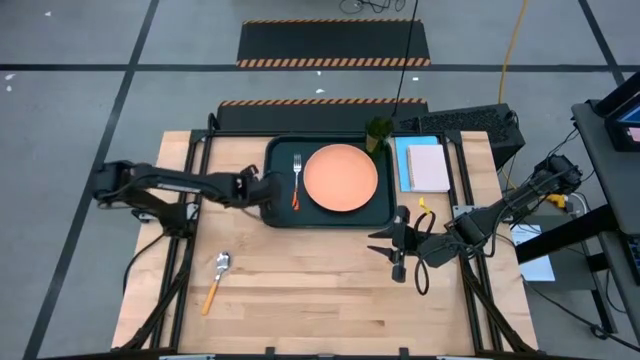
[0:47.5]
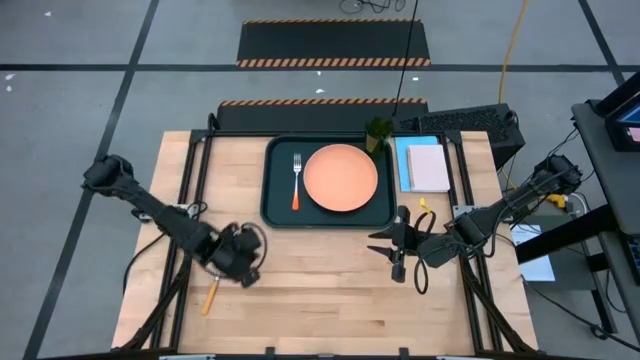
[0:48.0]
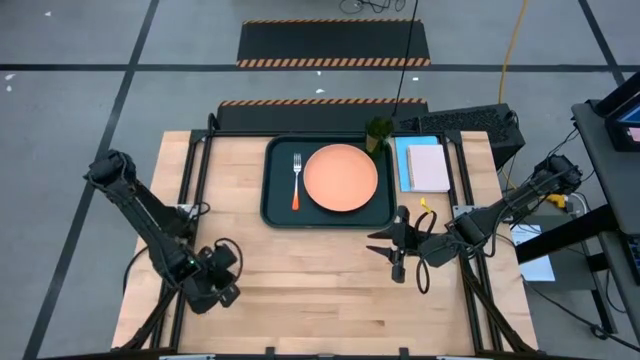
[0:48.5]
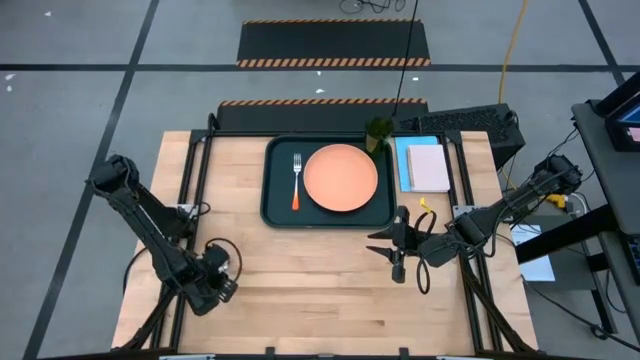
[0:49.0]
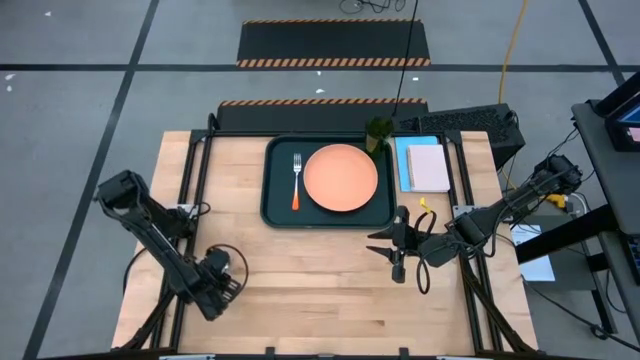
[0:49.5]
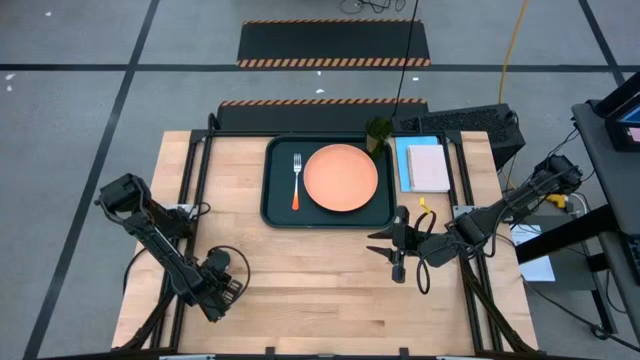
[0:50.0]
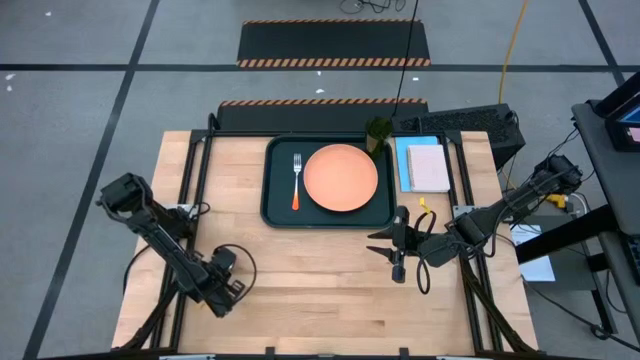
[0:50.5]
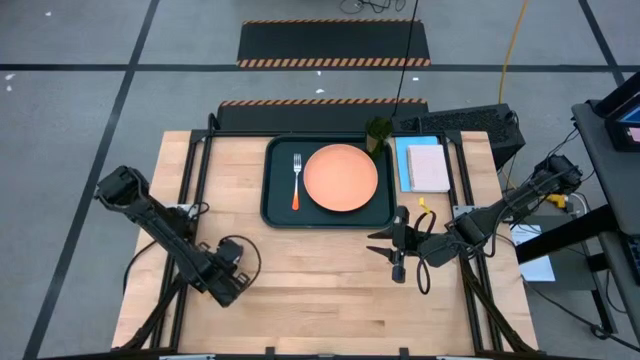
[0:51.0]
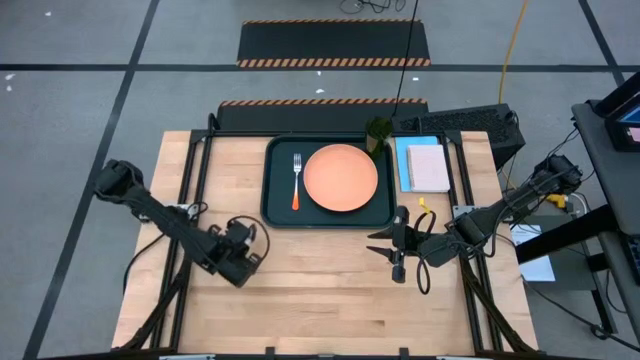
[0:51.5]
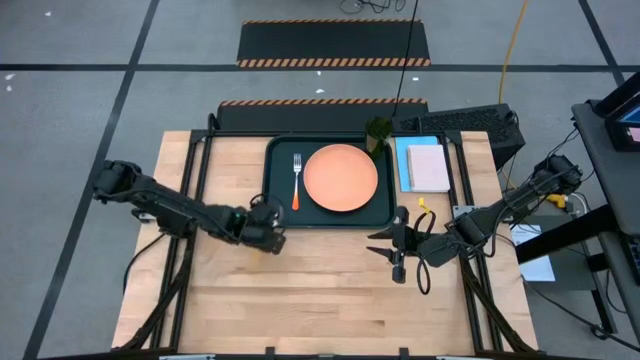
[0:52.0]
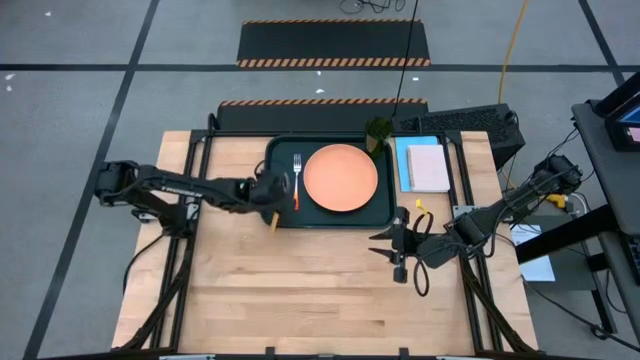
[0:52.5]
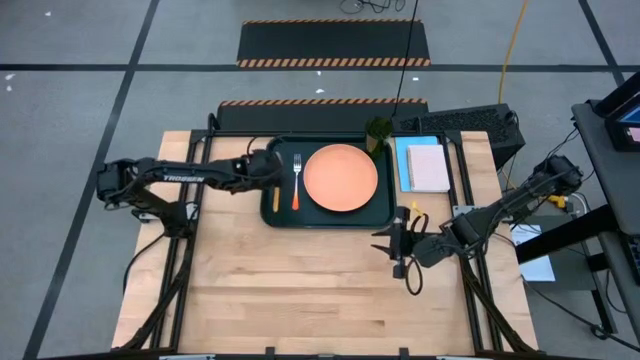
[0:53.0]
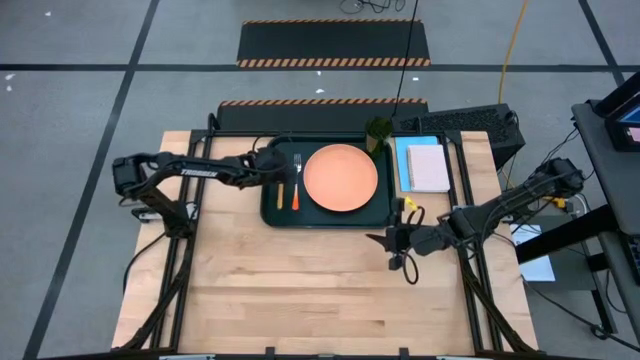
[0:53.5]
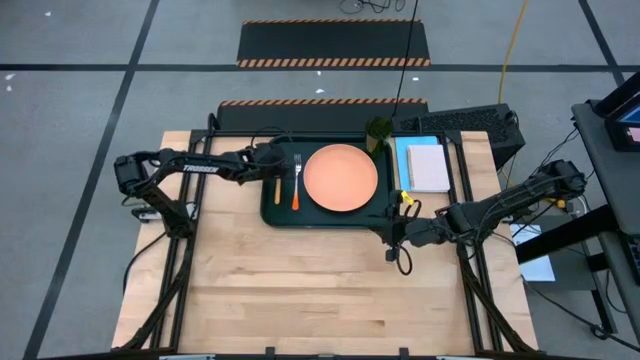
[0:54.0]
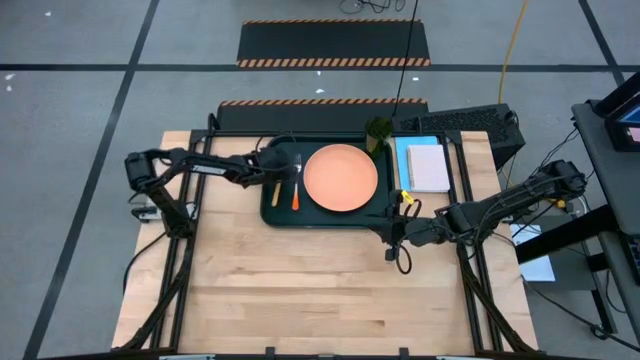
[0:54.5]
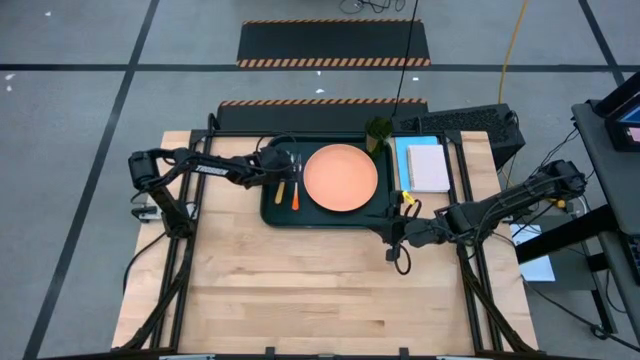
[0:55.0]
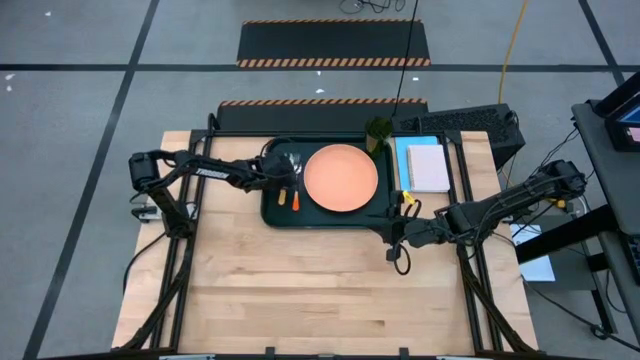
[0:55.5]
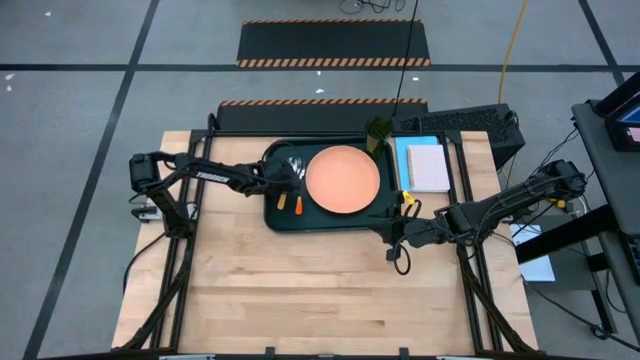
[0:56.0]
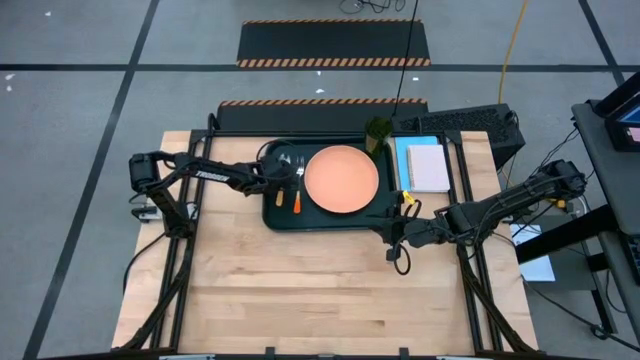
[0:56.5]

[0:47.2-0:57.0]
Task: Pick and place plate/cup/fork/spoon on tray
Put the orange spoon on the black serving tray to the left of the orange fork

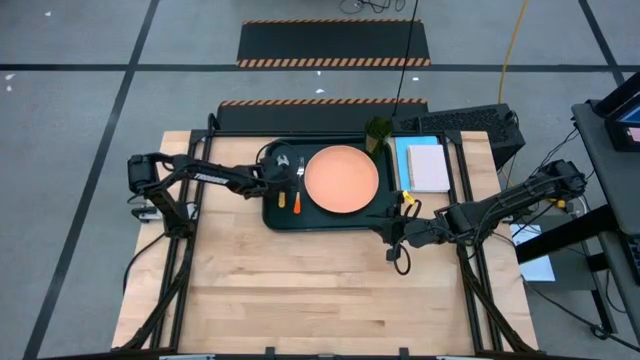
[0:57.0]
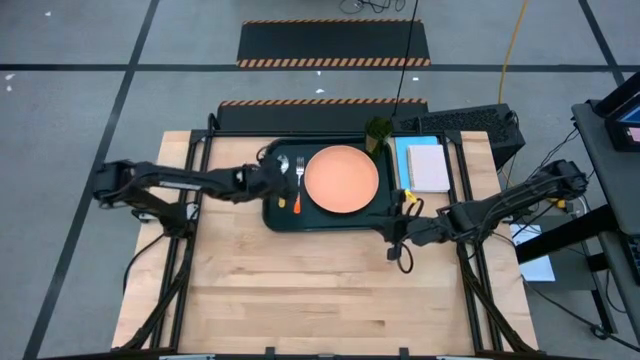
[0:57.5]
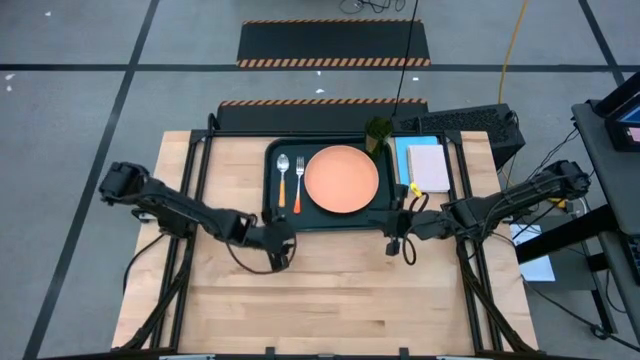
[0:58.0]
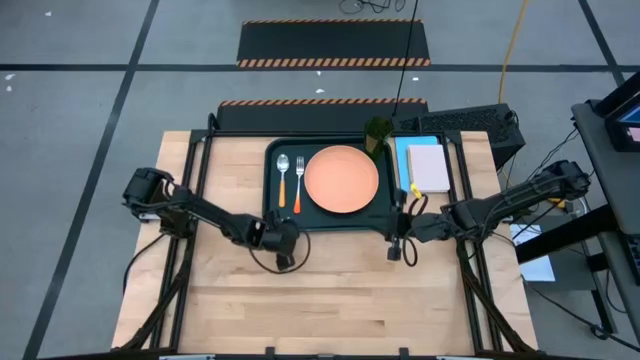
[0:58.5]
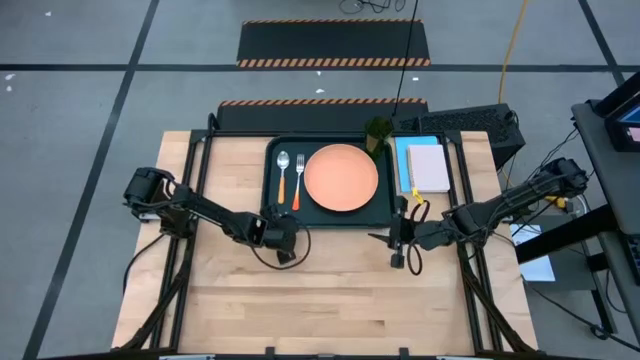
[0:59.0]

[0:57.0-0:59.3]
Adjust the black serving tray

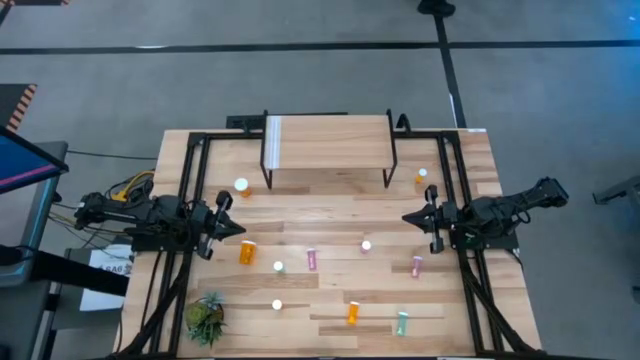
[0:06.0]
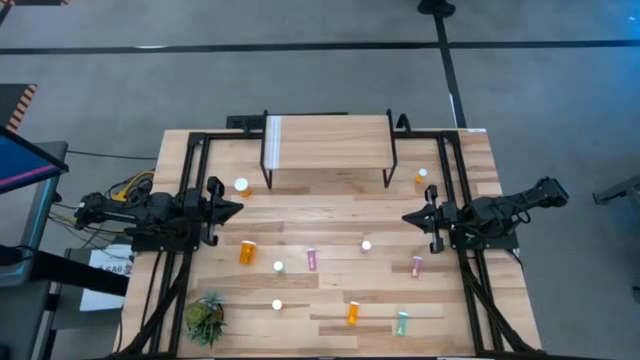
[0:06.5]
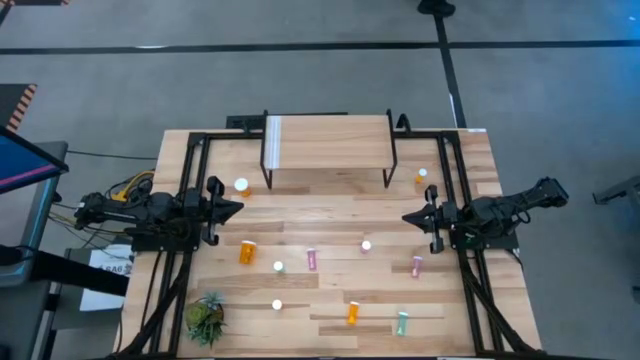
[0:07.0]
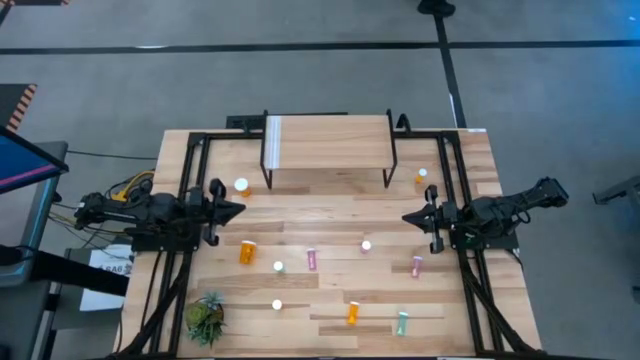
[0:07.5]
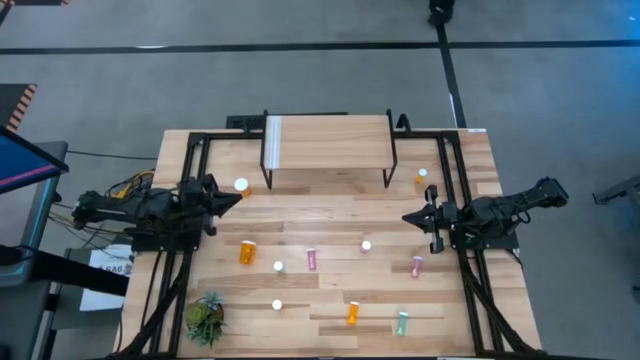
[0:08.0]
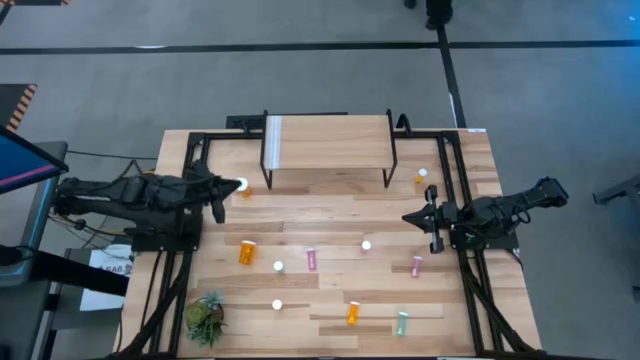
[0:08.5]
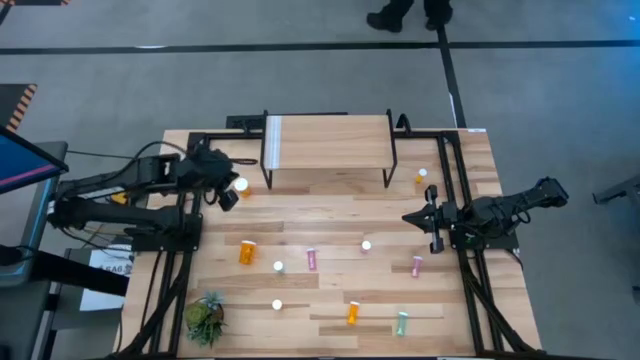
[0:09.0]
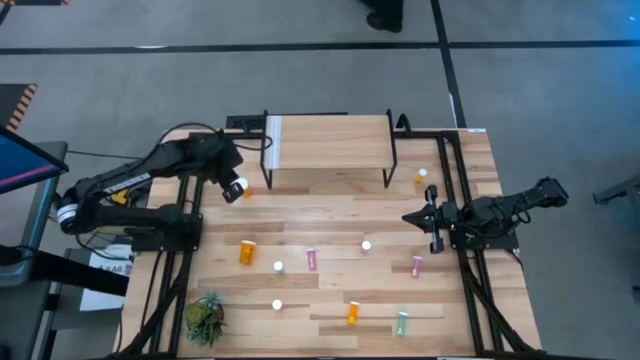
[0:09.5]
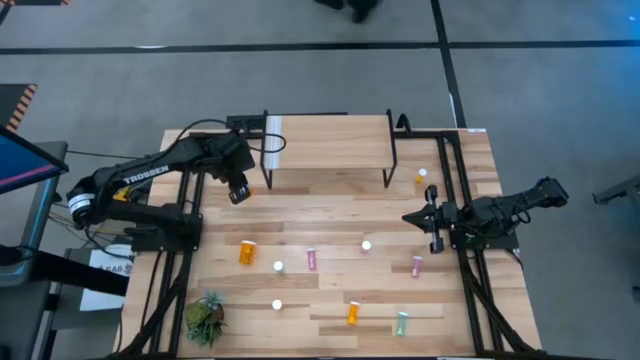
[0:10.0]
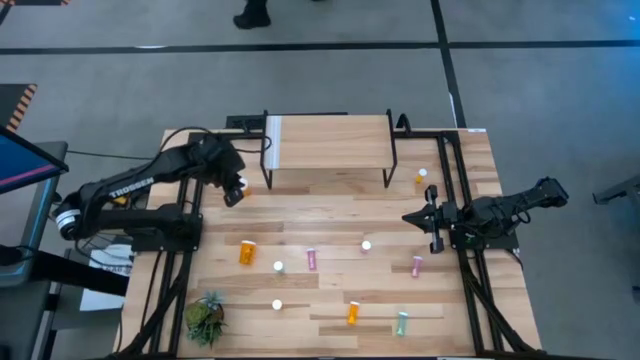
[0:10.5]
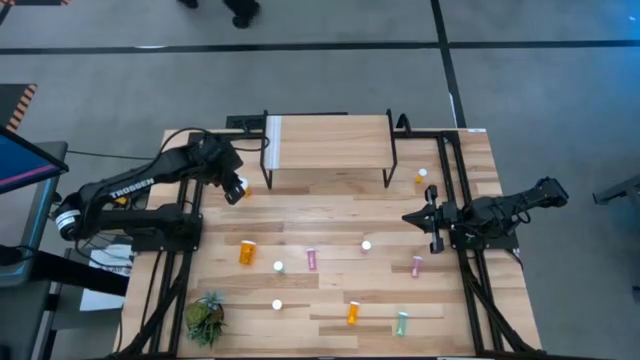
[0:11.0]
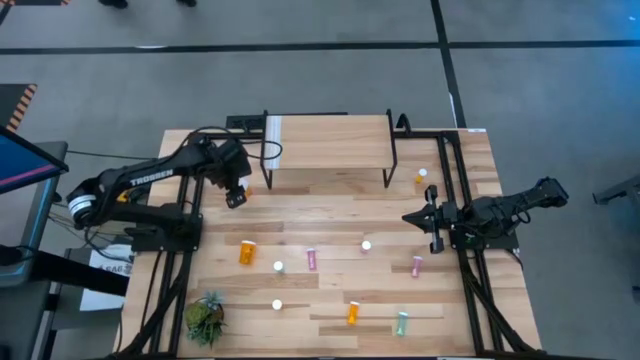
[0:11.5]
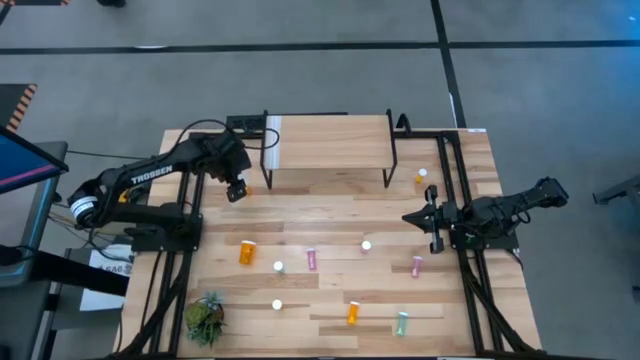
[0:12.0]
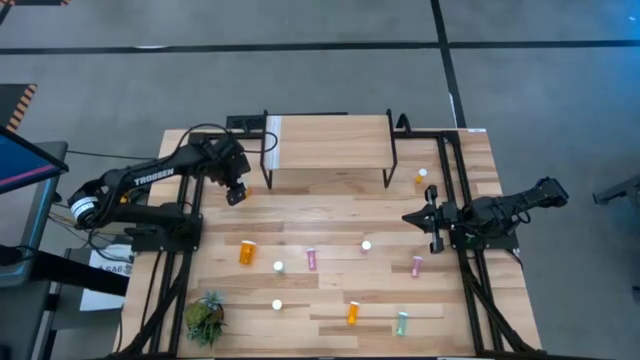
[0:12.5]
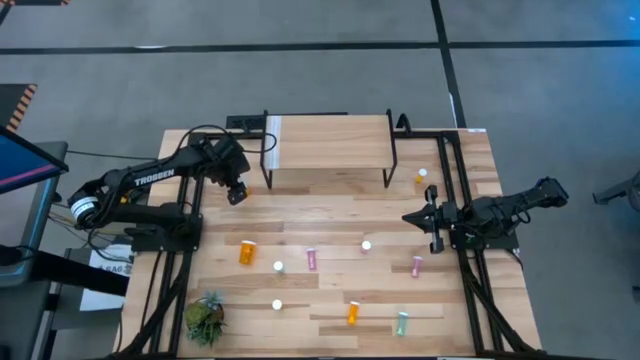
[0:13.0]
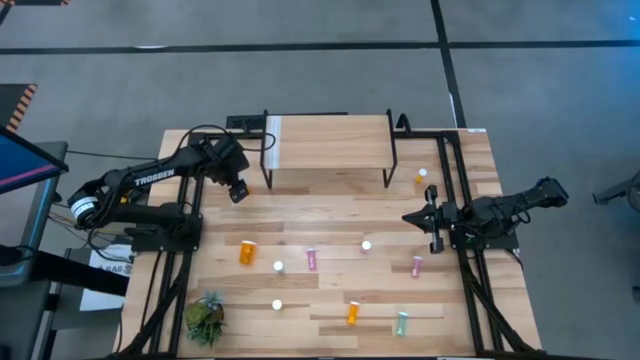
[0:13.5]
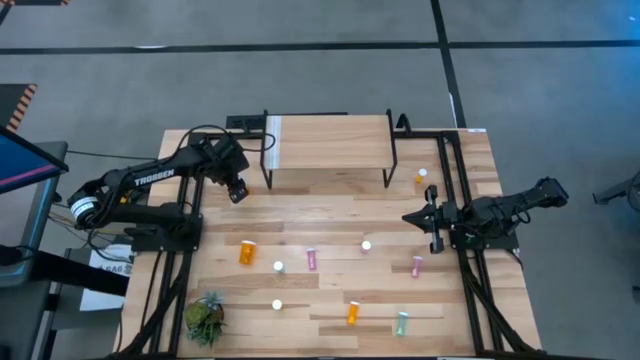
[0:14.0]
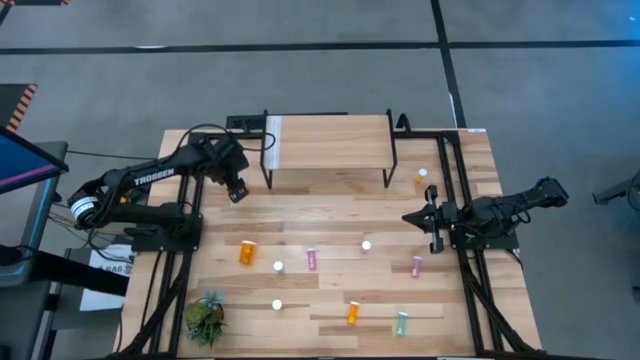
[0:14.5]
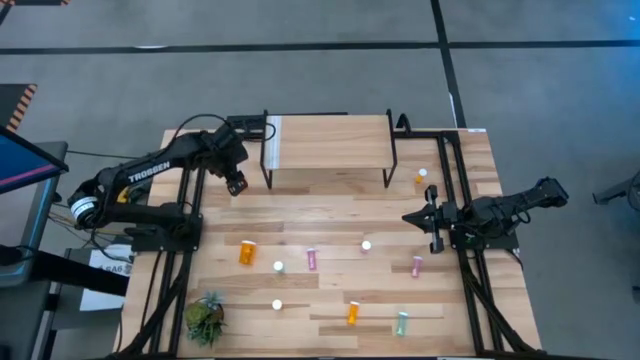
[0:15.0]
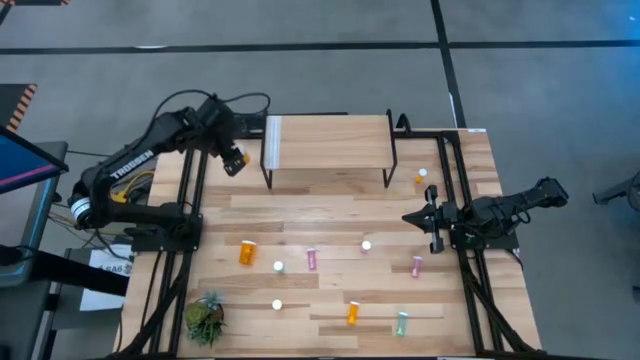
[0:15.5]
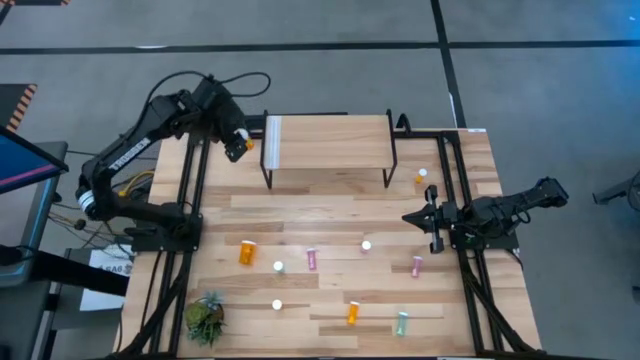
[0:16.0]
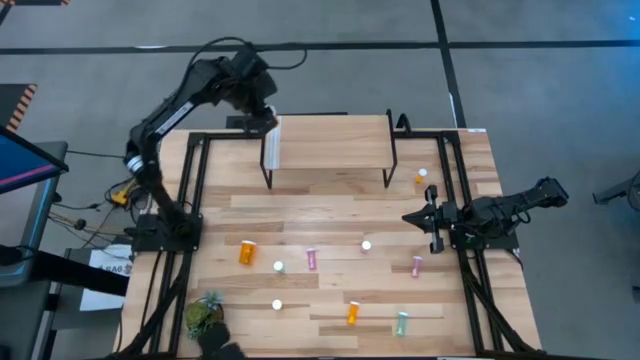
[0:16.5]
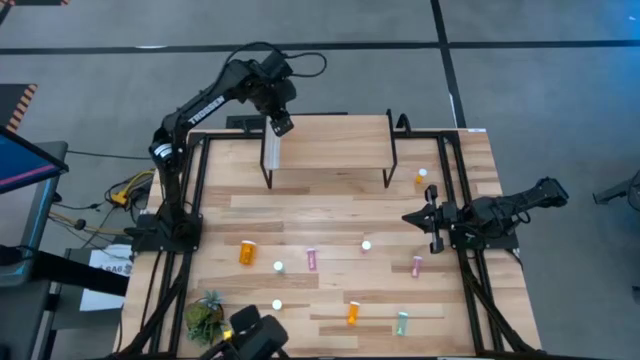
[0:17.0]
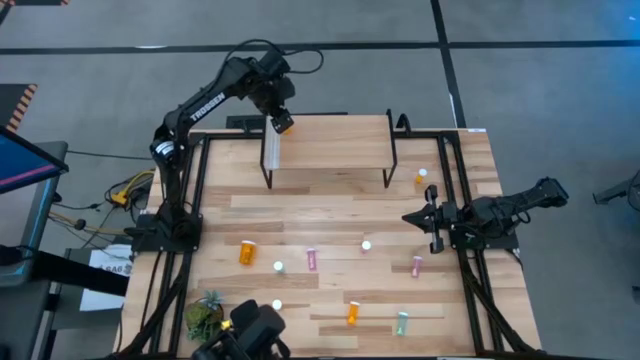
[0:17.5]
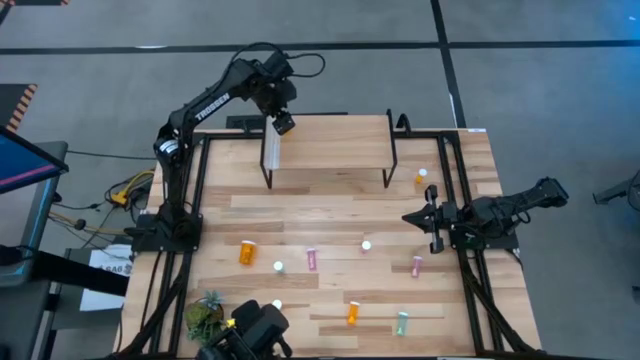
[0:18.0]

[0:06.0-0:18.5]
Task: Pick and place medicine bottles onto shelf by color
Put the top large orange pill bottle on the shelf
